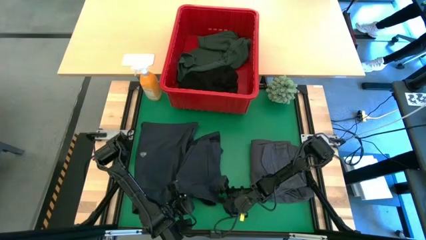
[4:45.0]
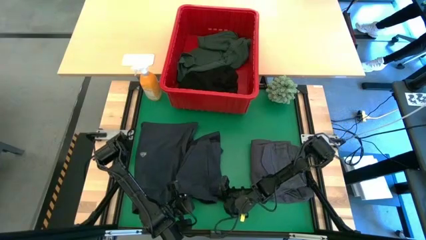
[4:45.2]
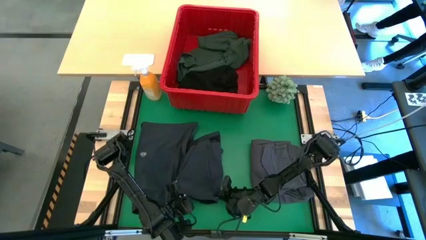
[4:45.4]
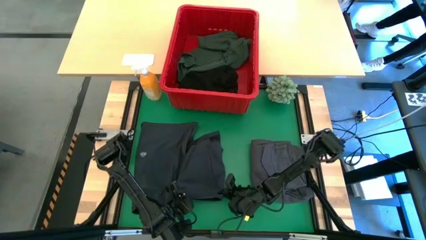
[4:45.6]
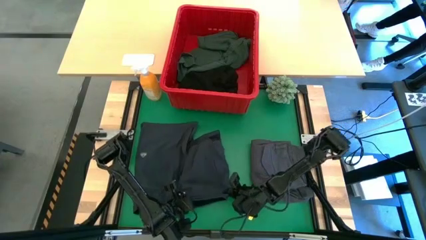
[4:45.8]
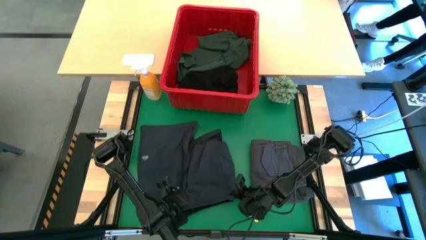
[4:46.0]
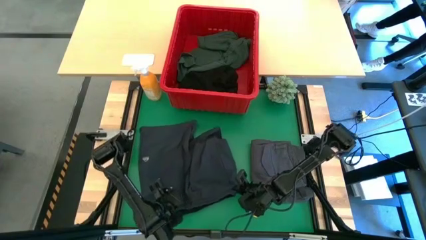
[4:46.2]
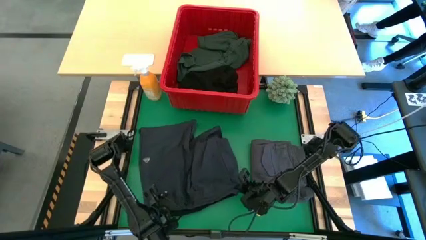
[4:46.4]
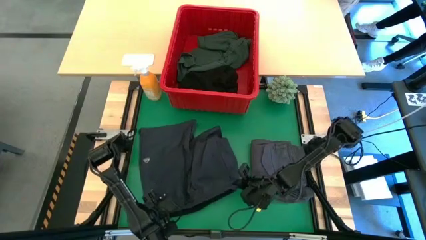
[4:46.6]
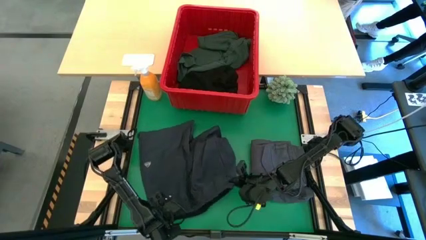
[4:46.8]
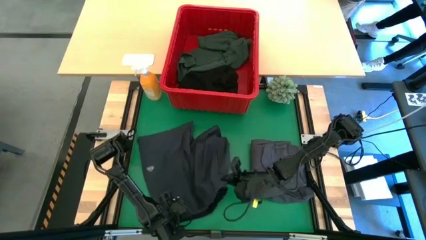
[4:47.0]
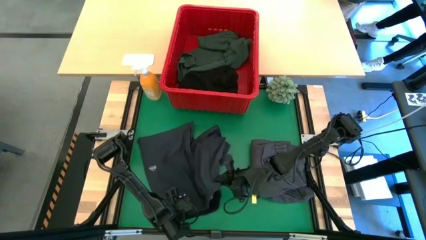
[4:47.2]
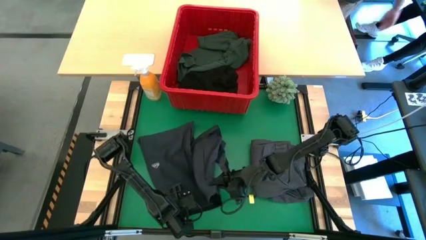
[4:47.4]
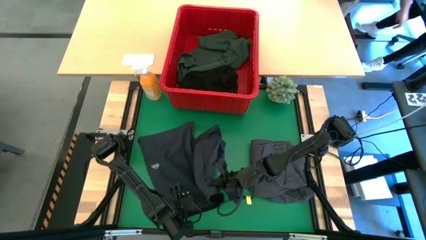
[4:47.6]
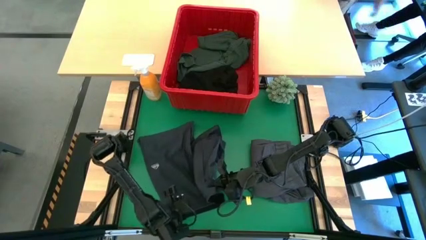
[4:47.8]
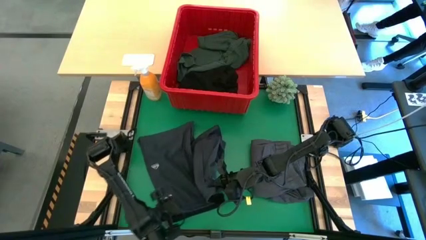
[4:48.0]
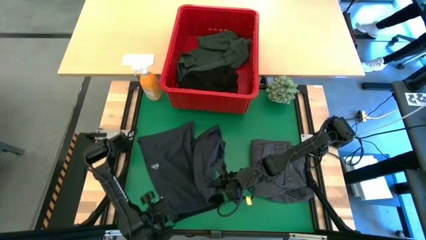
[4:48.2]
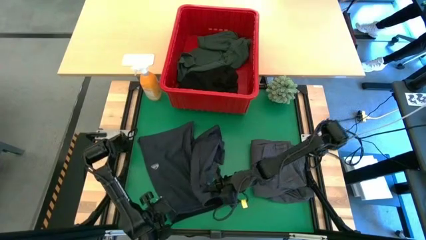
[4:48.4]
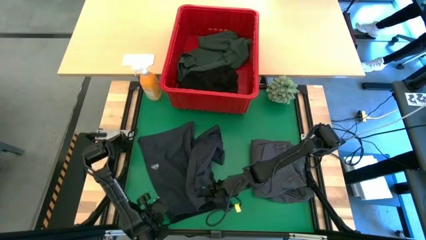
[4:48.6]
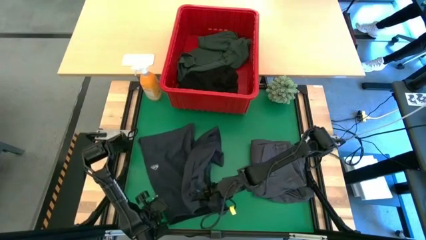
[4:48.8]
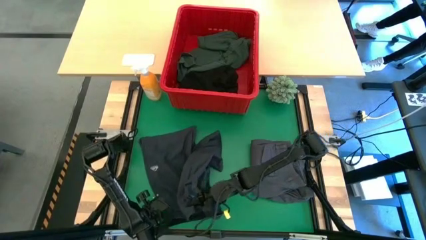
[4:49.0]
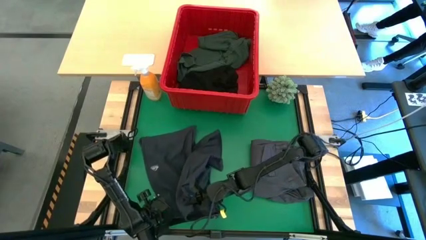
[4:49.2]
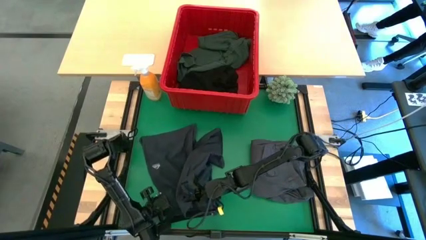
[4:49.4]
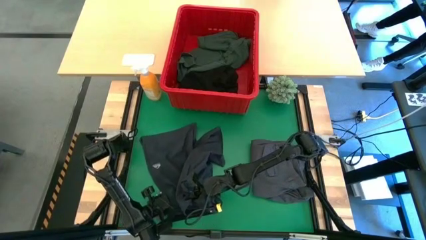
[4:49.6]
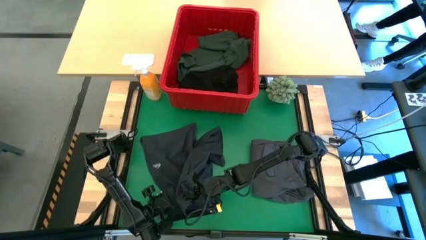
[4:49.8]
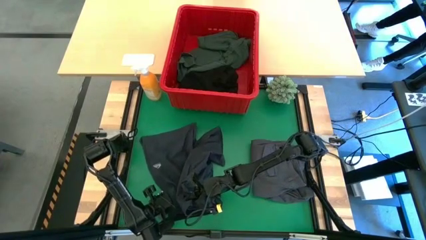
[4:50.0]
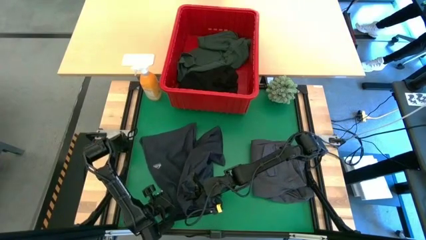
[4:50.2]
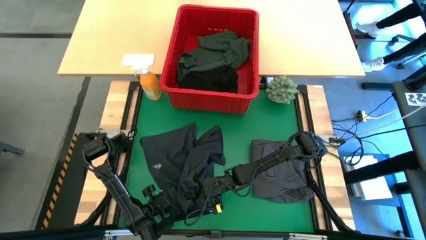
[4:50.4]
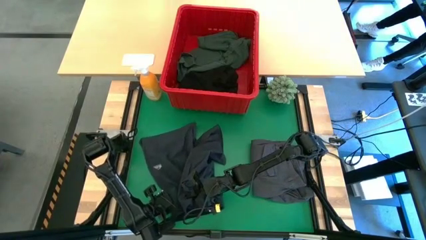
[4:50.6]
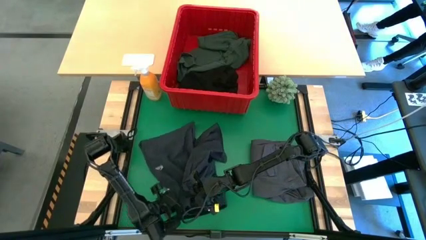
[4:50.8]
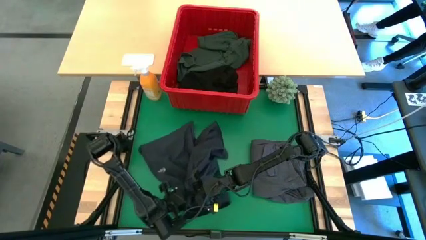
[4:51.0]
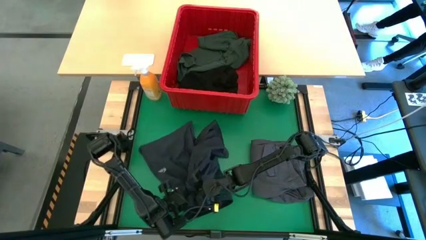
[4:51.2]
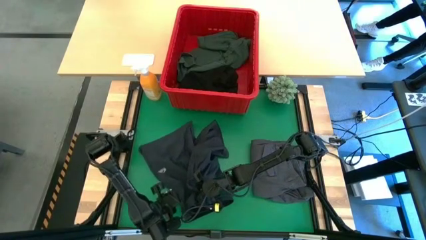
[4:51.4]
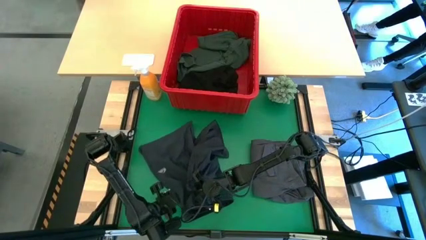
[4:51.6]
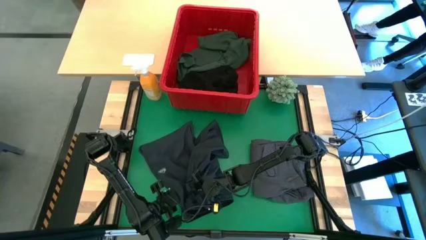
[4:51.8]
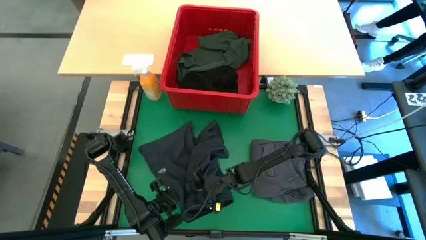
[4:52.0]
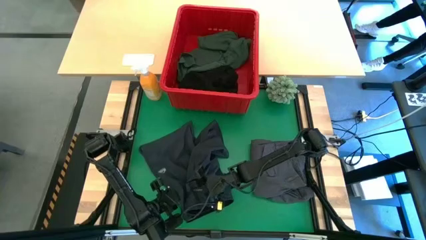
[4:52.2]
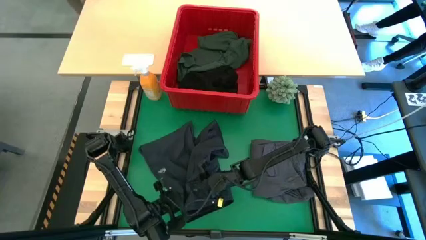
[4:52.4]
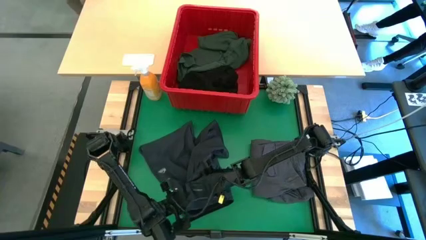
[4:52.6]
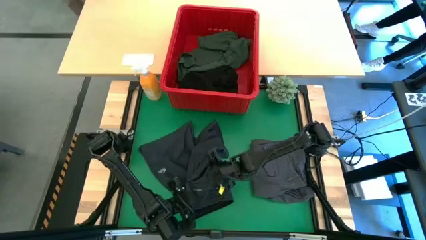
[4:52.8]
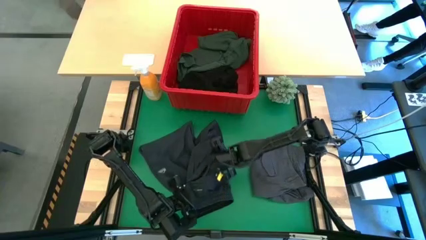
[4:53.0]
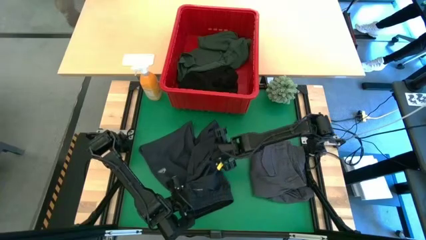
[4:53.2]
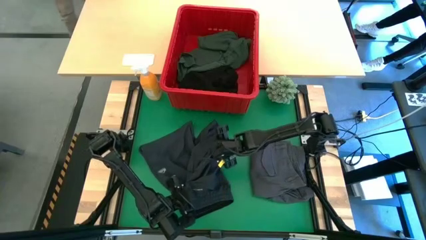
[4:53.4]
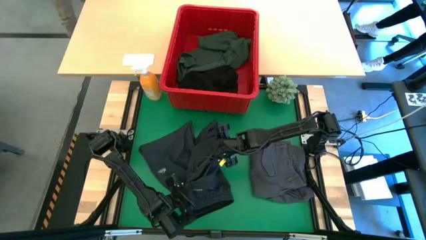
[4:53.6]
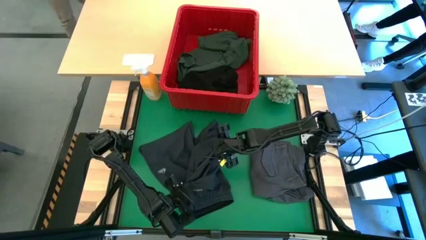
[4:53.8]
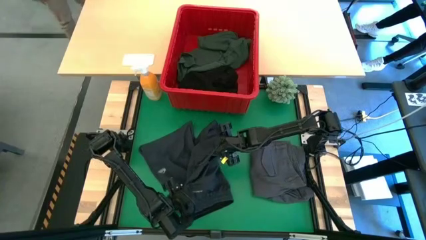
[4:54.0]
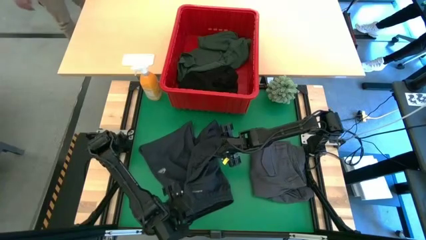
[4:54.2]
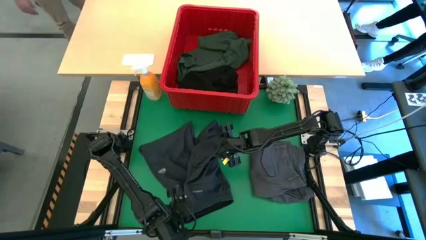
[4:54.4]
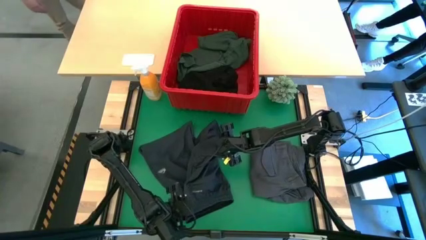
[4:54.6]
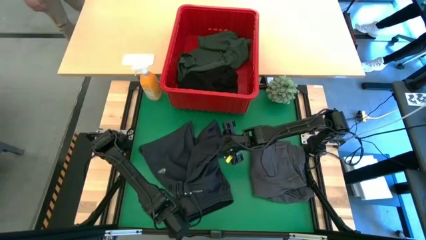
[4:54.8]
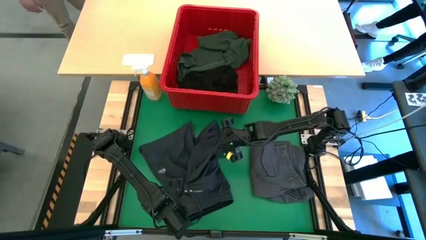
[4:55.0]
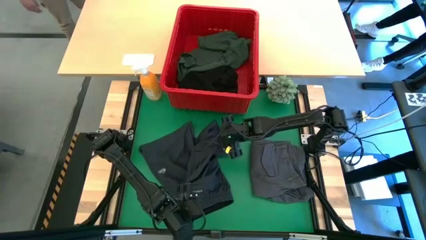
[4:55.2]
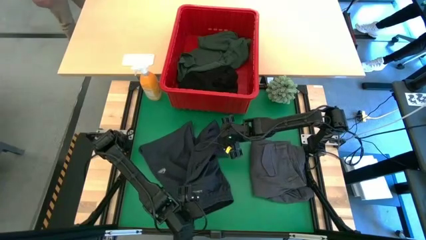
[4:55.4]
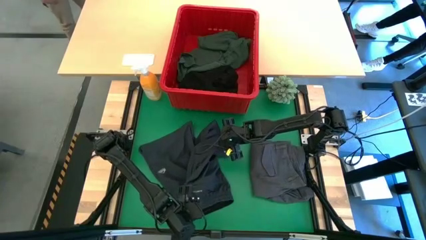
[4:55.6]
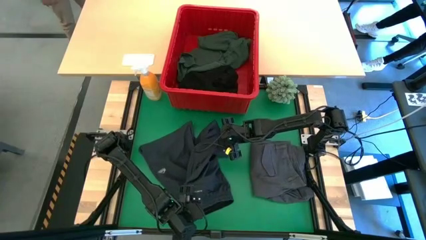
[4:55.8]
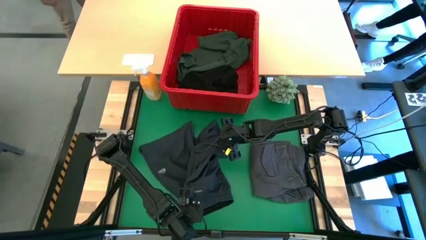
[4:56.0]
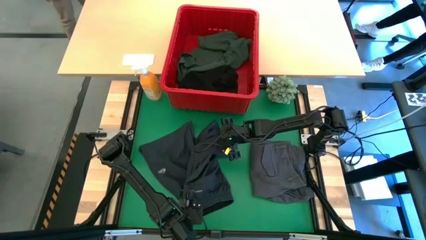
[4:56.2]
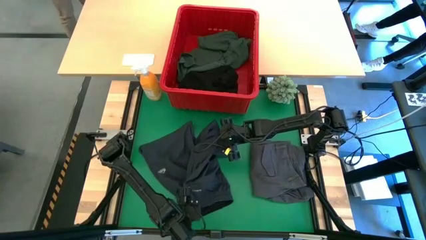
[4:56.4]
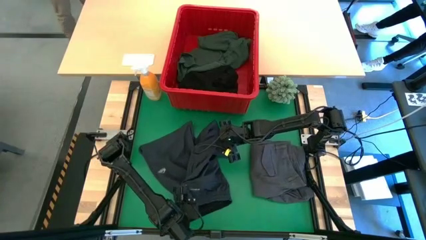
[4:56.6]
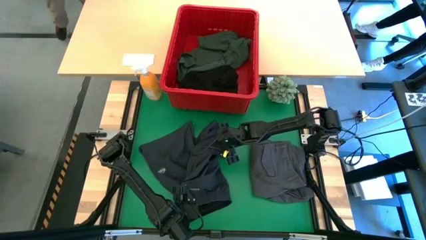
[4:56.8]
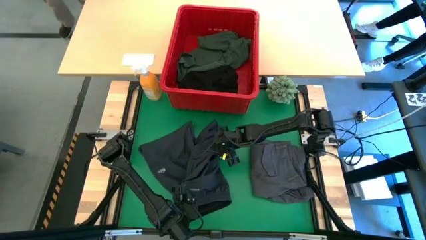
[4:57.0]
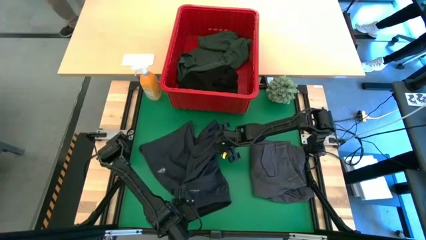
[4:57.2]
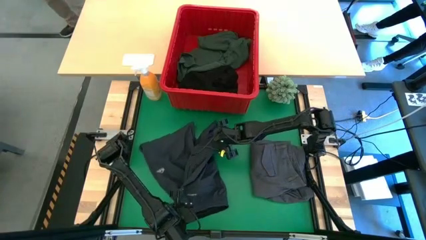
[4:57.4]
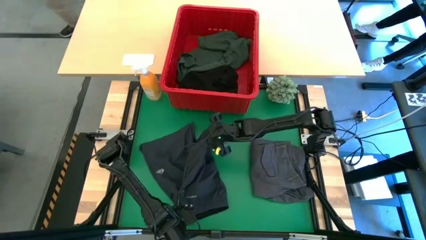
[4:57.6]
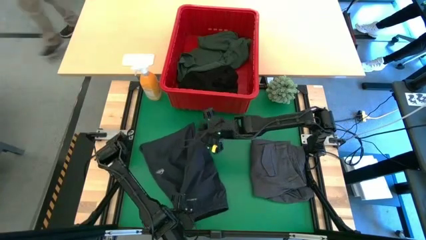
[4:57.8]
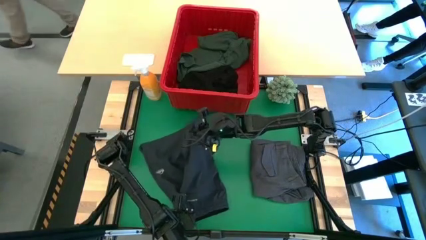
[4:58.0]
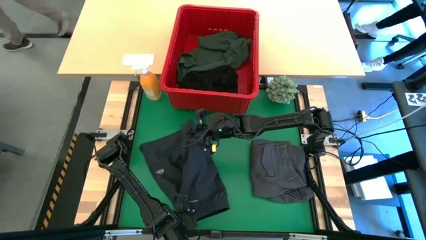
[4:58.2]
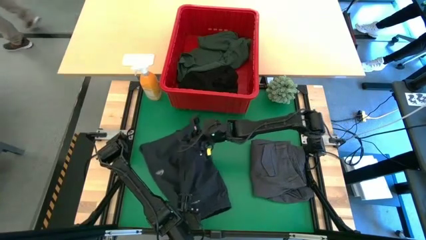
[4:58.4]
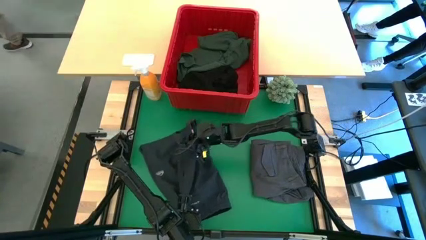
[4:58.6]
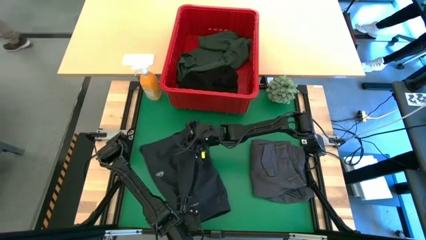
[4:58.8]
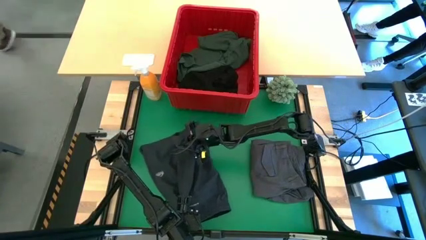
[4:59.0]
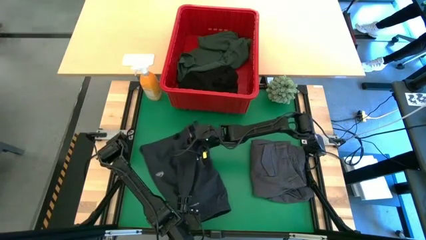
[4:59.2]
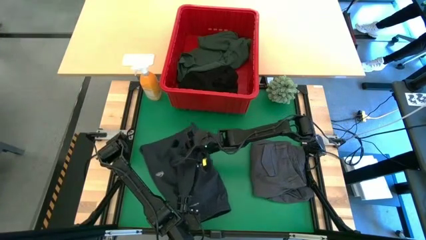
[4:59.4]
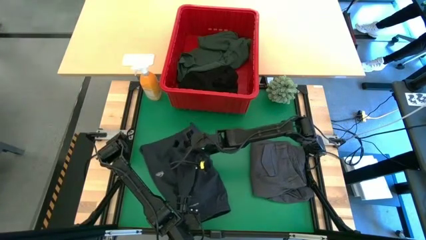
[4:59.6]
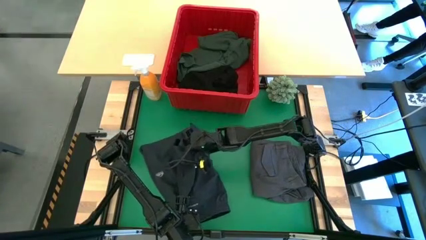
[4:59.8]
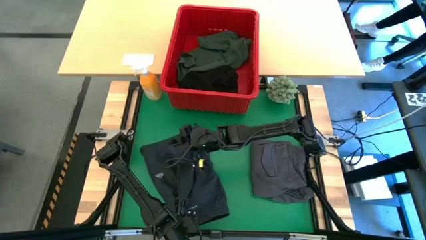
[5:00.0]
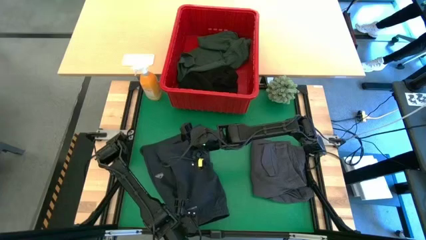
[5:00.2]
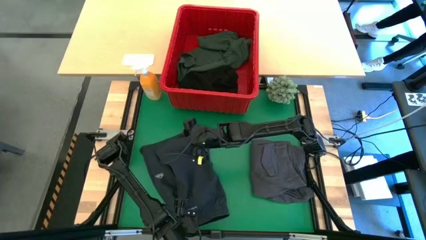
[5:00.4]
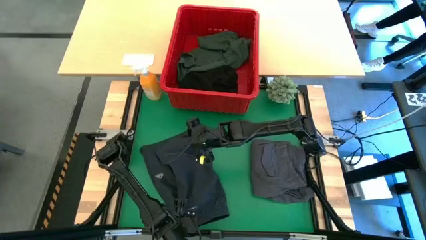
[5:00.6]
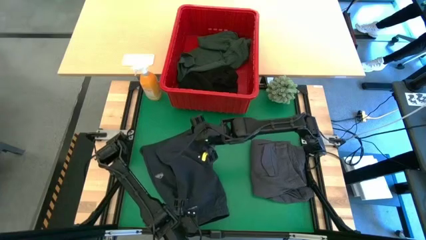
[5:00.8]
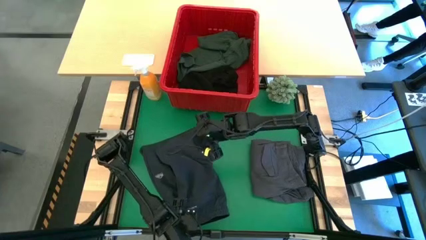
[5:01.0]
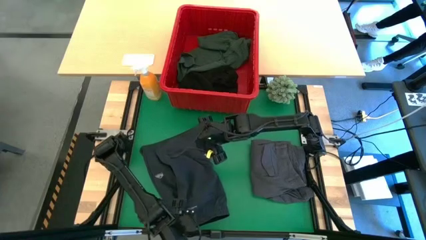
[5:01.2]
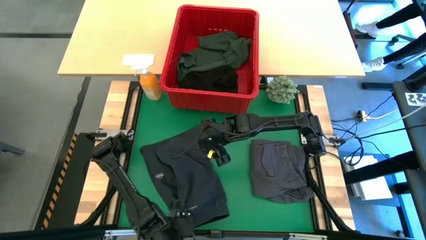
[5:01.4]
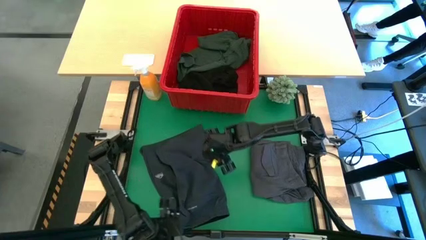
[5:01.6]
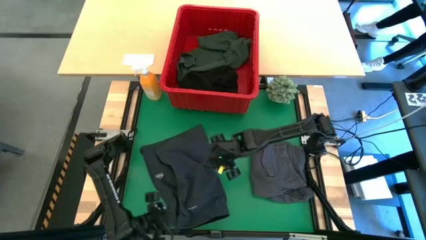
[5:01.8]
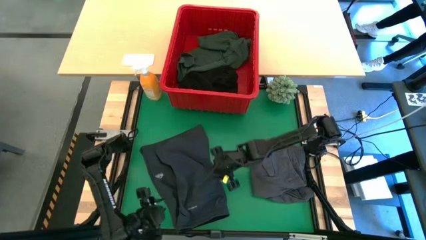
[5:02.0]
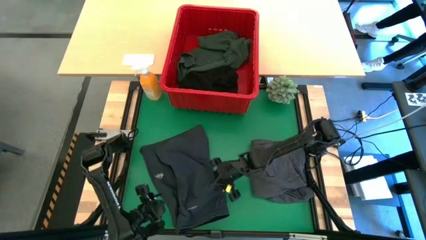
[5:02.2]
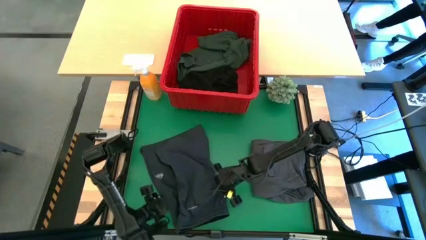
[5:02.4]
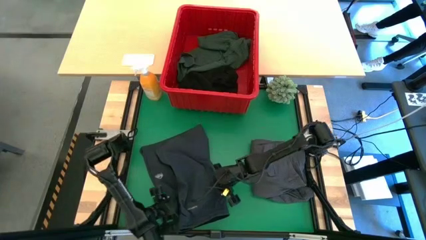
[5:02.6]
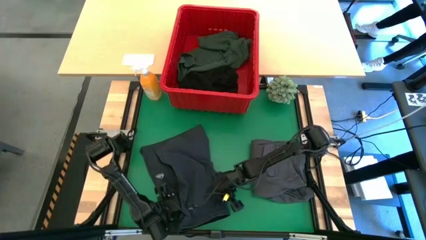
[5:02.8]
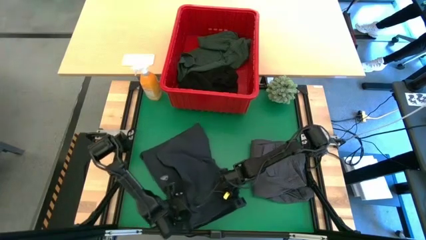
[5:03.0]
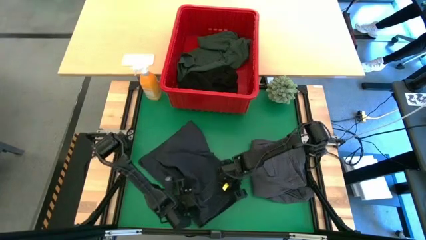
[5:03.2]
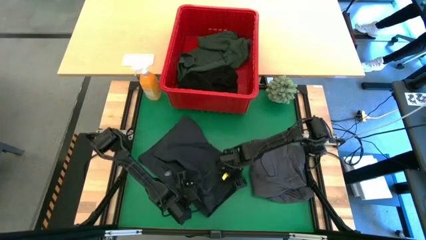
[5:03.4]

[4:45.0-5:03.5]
Task: Fold Laundry from Bin
Fold the dark gray short
